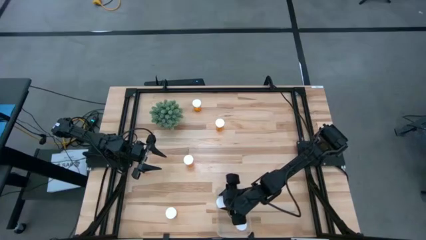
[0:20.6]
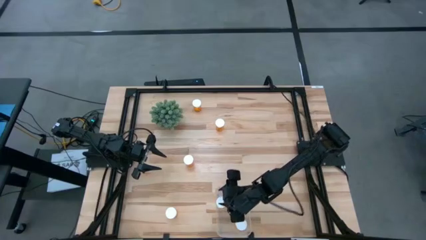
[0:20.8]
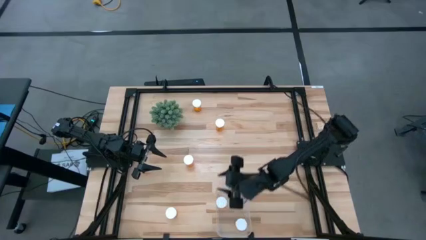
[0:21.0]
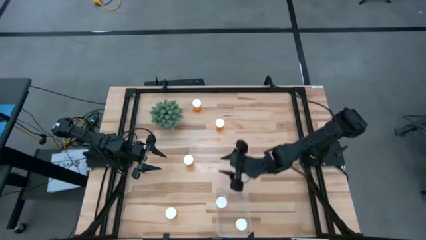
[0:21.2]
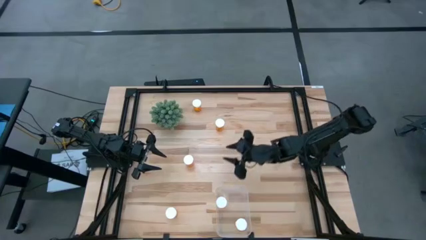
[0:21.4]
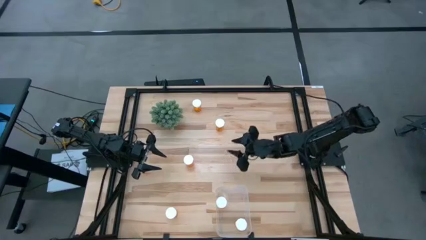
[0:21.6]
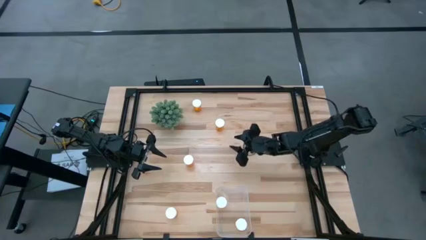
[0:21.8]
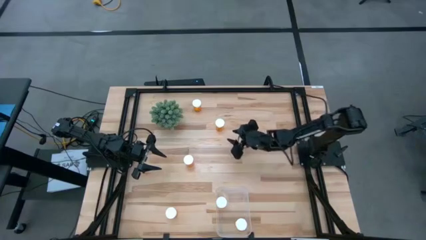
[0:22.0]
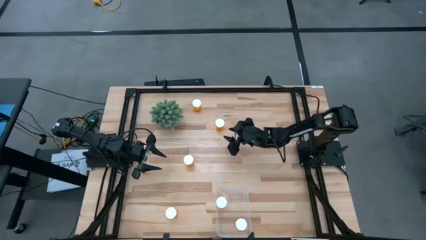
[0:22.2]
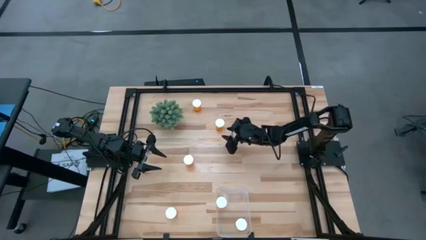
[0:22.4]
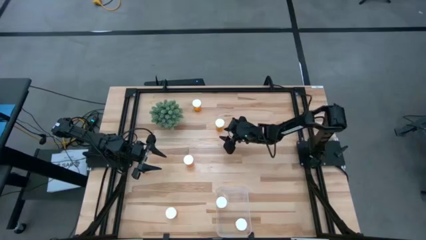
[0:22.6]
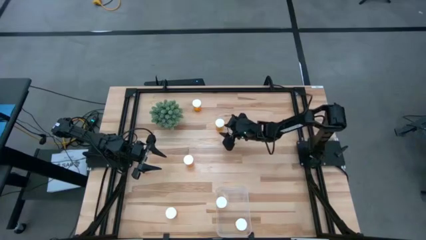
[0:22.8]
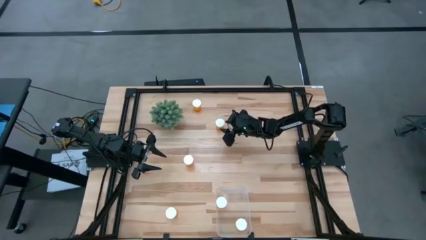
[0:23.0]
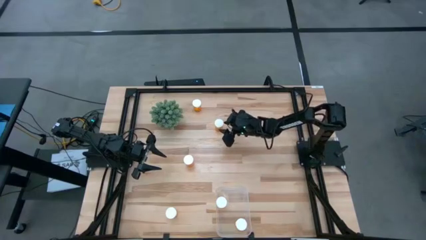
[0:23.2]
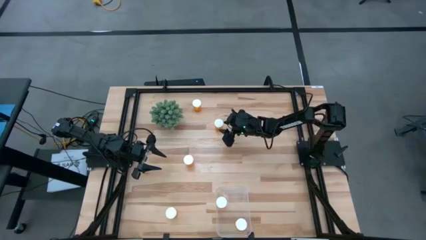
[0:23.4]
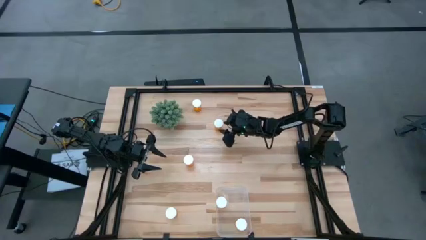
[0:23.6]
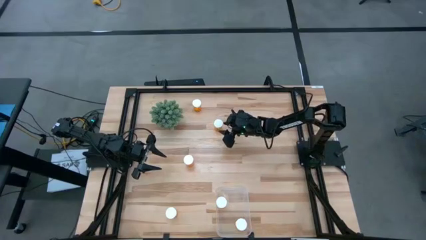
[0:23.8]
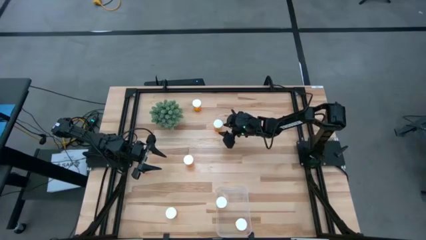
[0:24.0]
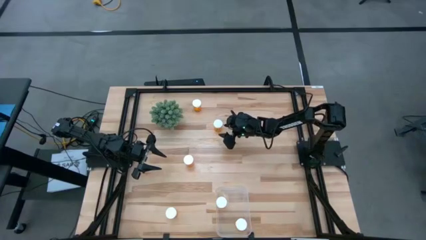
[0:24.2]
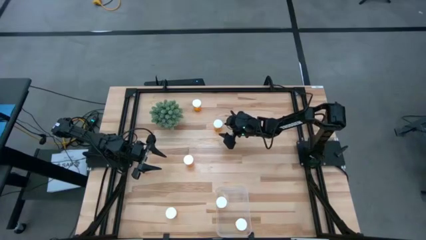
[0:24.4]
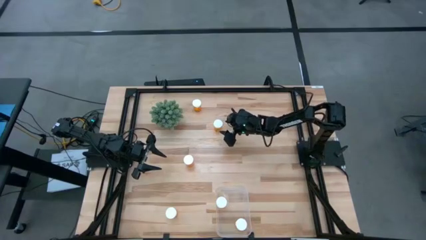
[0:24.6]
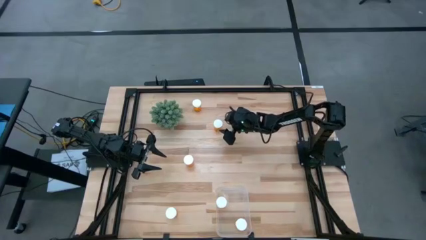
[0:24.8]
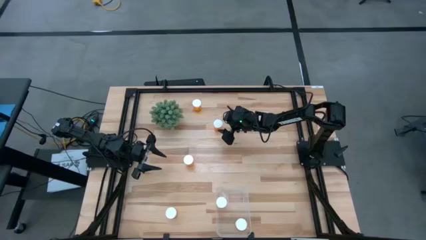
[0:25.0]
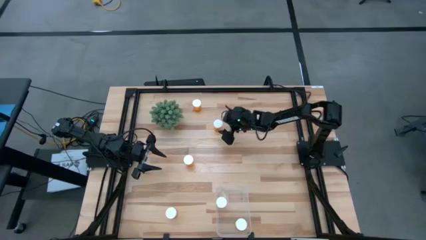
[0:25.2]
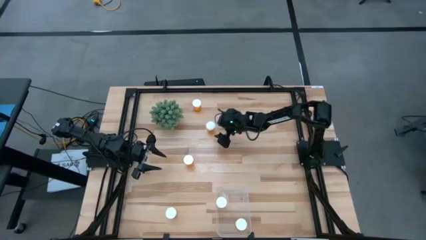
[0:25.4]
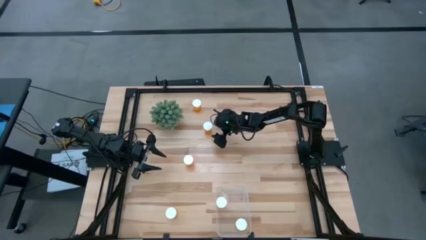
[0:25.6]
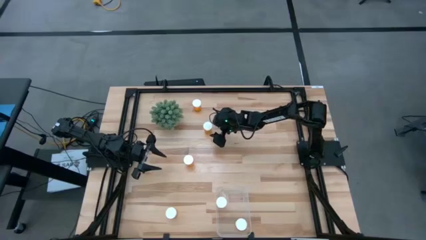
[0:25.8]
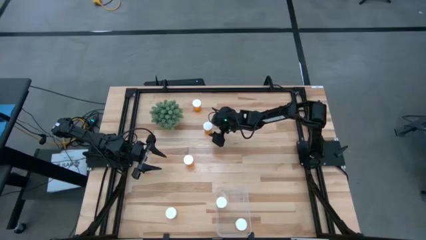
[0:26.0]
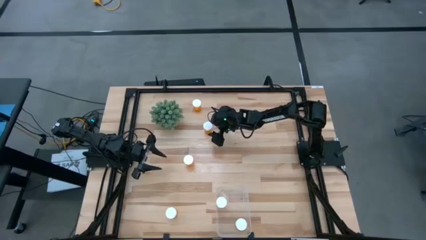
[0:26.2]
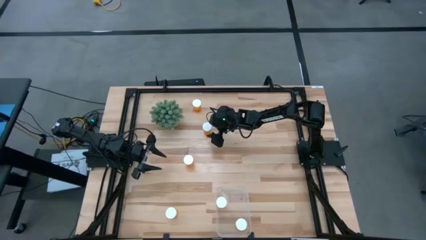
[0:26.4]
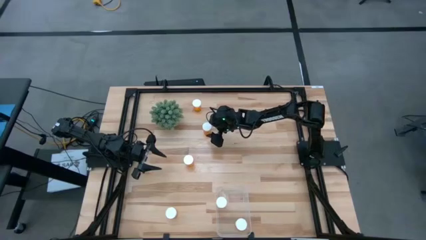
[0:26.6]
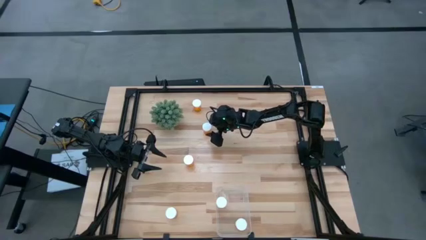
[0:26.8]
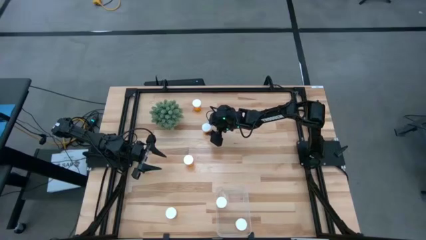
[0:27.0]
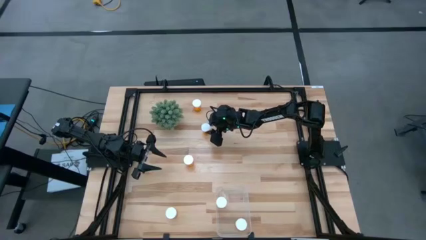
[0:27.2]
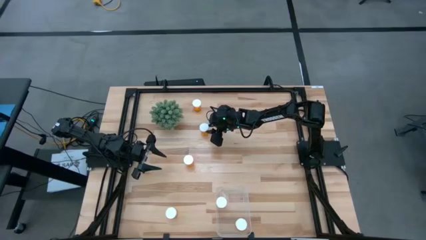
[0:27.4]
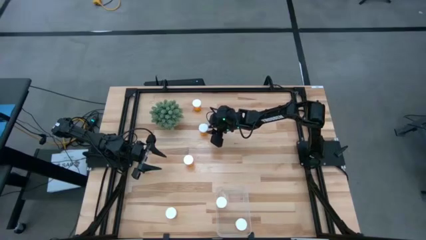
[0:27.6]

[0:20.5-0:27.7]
Task: Pick and place pill bottles into a basket
Put the orange pill bottle into the transparent bin

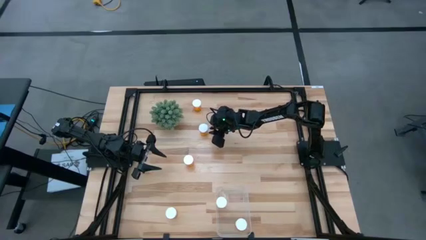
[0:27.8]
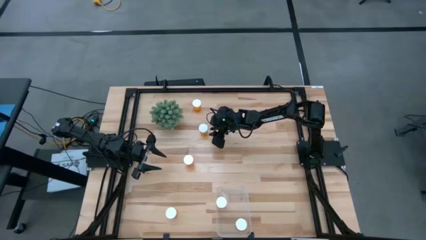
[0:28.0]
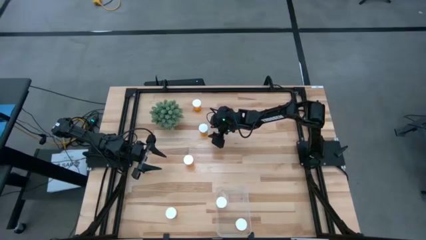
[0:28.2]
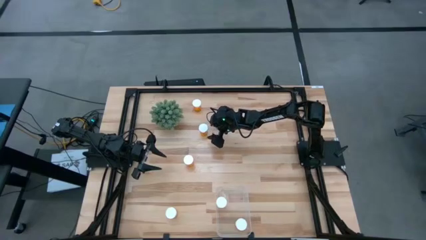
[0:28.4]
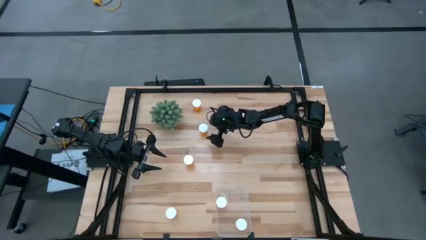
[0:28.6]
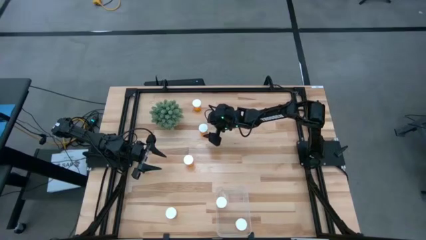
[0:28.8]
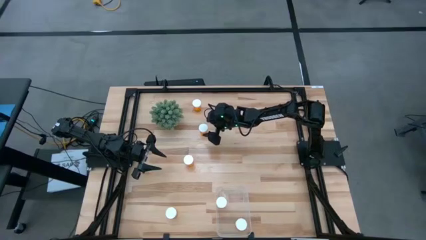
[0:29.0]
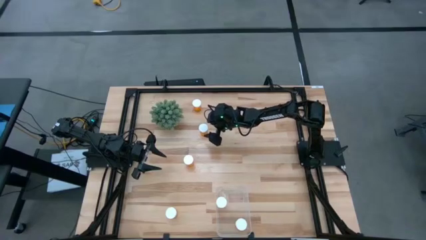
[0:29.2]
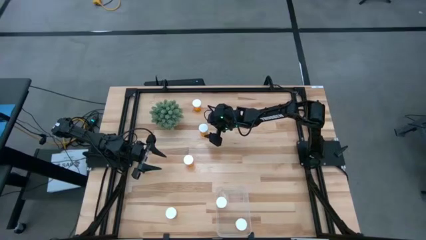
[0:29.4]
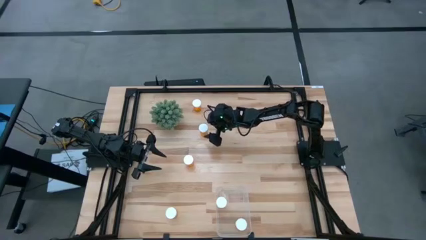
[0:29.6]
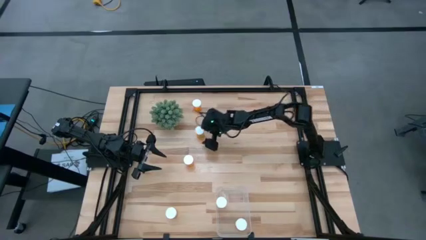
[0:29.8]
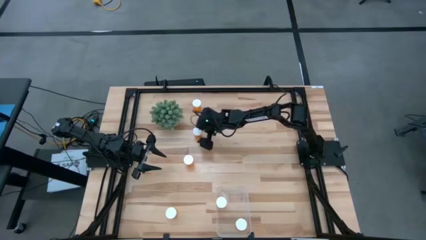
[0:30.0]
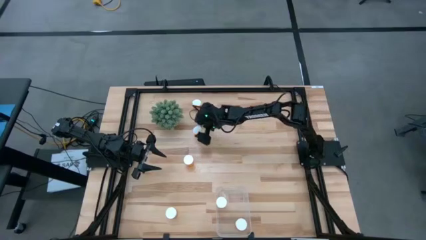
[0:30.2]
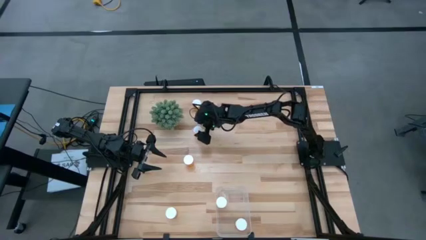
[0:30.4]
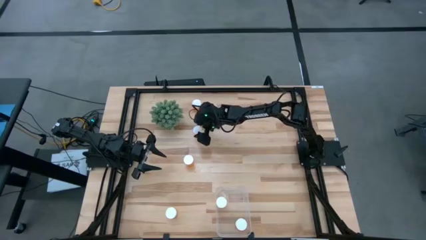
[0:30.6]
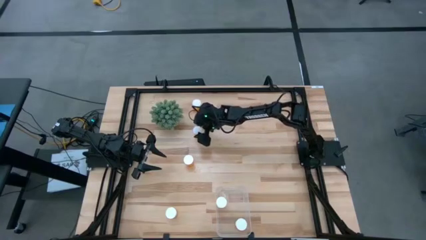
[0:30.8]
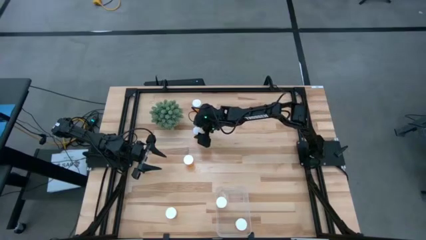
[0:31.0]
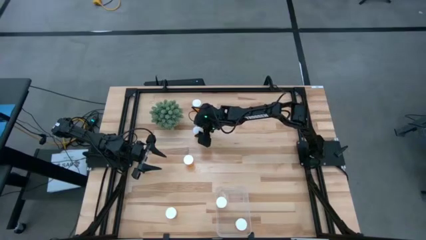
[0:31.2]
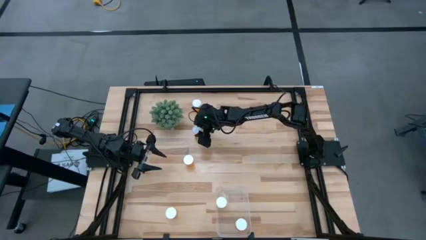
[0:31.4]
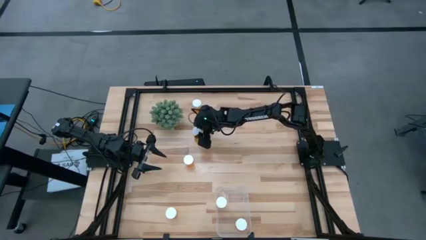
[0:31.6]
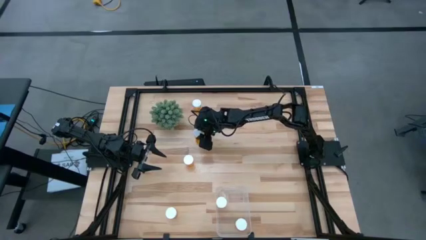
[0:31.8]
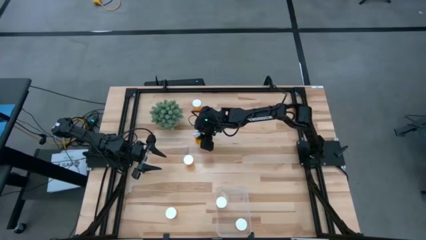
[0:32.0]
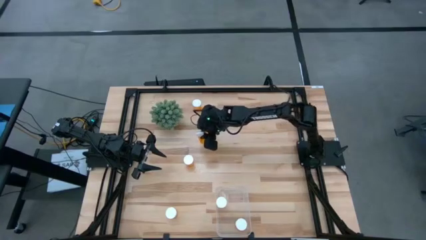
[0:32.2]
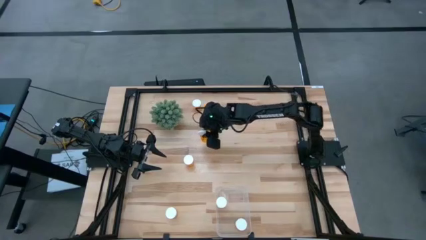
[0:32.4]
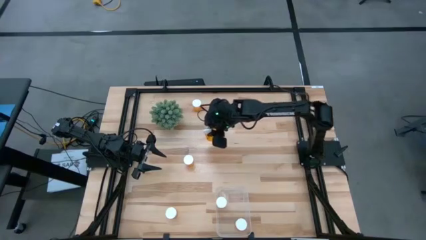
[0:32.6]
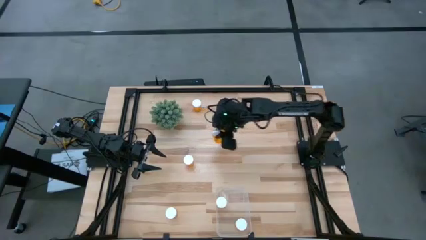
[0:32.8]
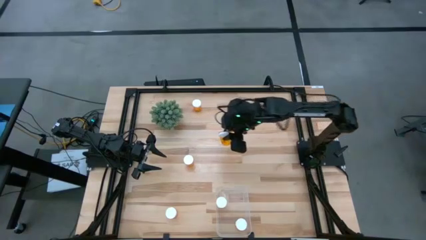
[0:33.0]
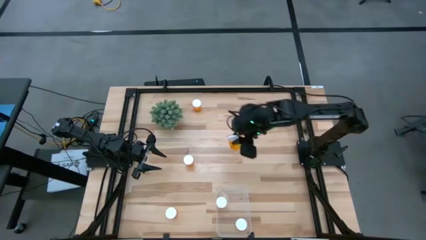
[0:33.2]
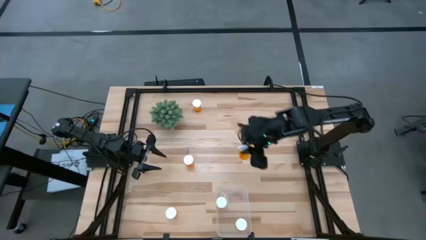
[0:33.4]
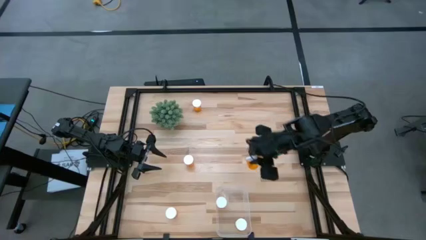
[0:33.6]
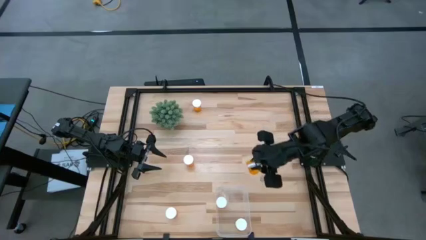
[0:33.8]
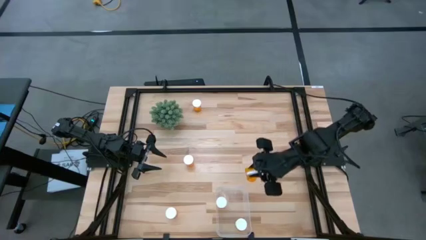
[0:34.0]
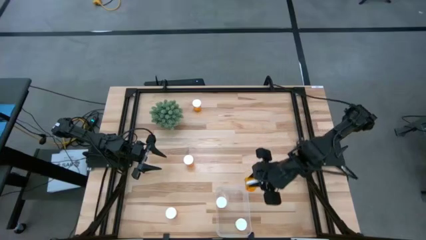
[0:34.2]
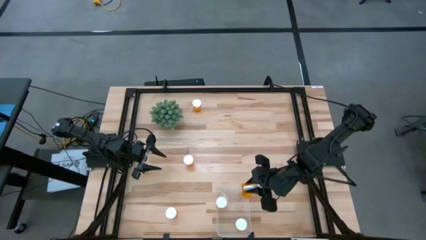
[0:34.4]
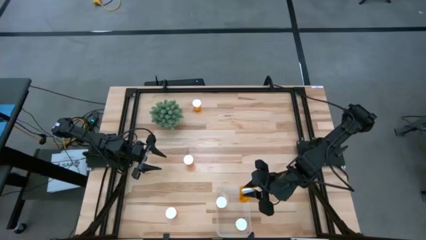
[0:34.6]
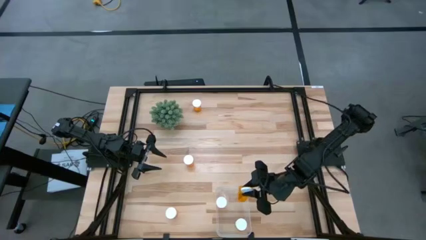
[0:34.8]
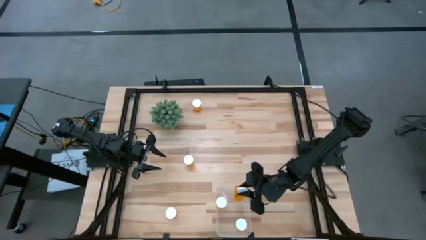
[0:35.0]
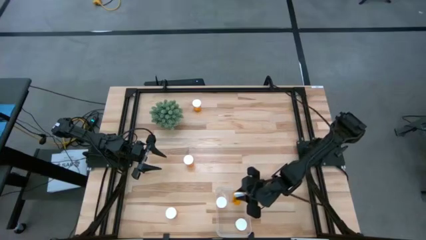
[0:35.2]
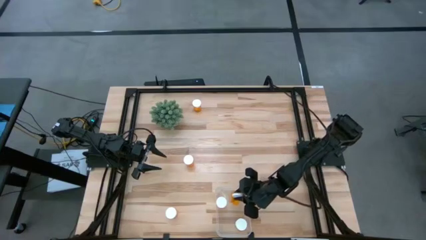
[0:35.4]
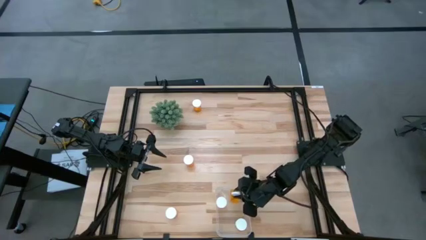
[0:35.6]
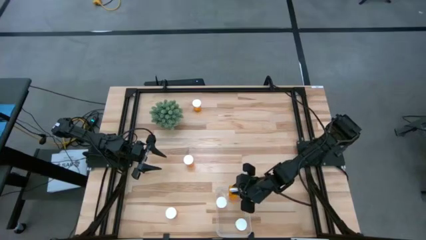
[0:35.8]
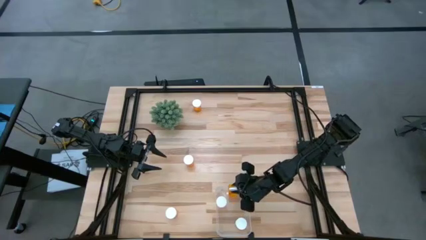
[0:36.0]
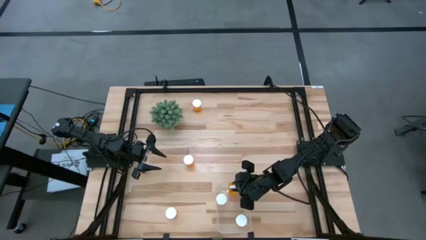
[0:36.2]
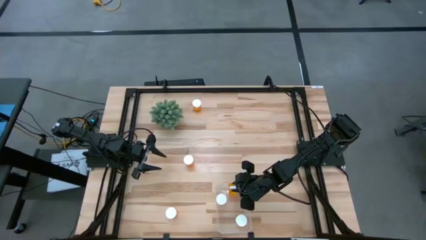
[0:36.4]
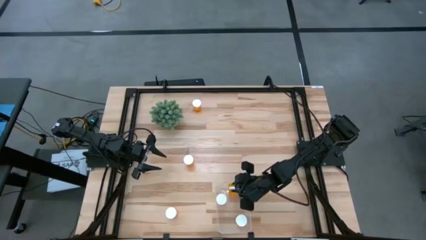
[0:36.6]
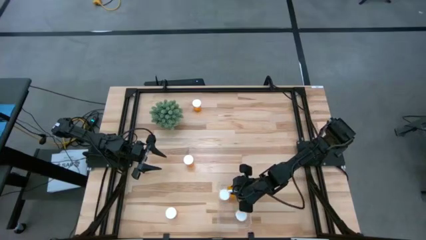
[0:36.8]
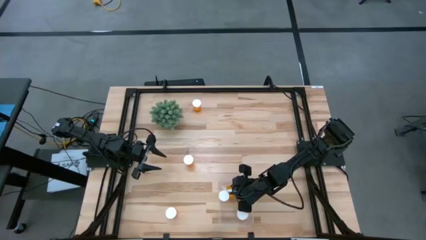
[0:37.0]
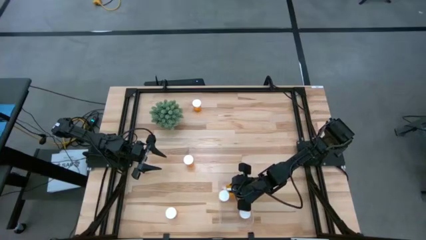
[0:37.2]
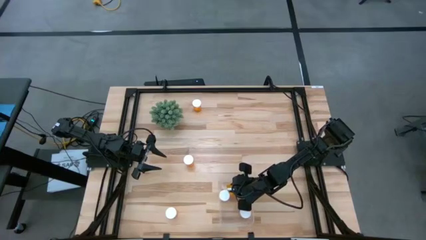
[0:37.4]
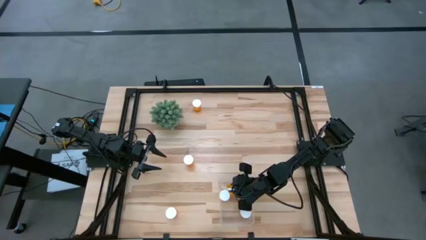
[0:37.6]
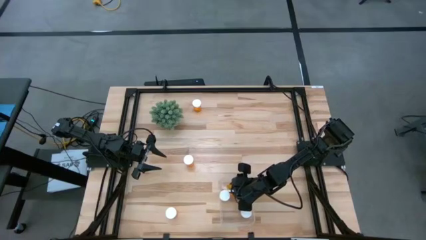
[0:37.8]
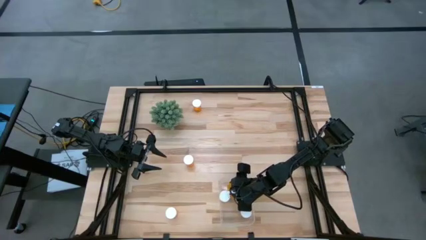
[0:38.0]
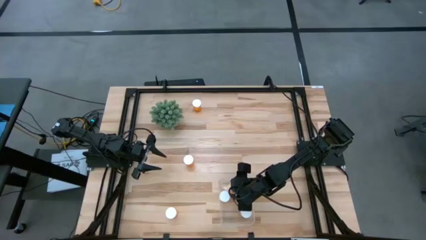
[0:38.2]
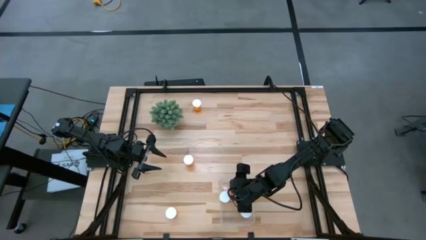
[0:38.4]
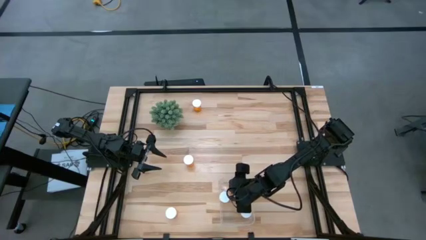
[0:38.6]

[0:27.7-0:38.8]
Put the orange pill bottle into the transparent bin
